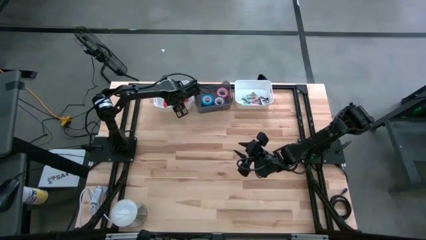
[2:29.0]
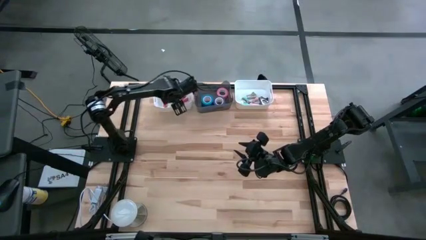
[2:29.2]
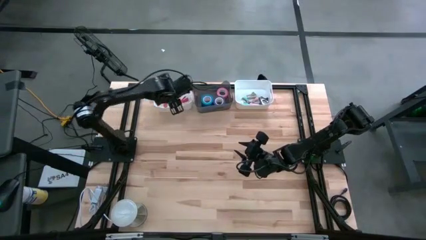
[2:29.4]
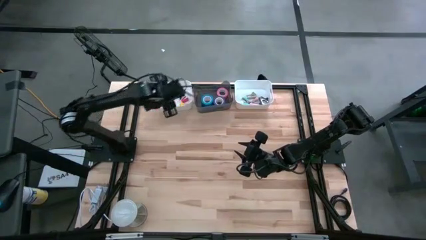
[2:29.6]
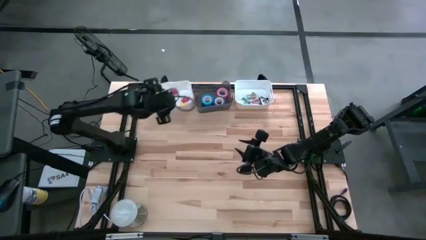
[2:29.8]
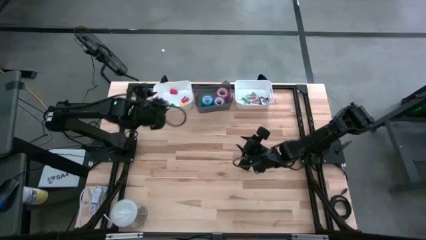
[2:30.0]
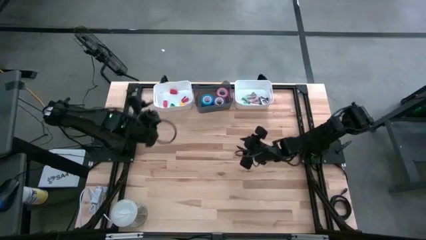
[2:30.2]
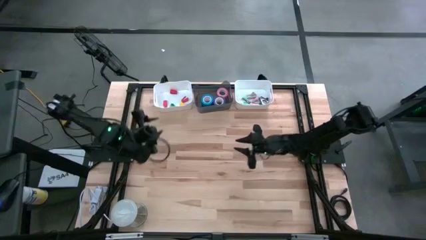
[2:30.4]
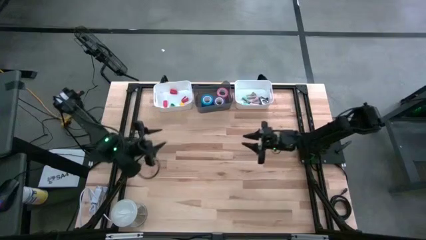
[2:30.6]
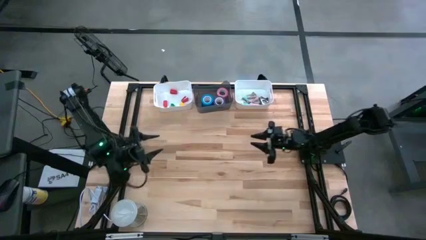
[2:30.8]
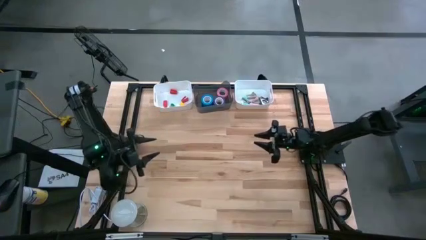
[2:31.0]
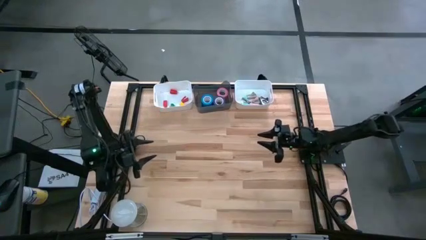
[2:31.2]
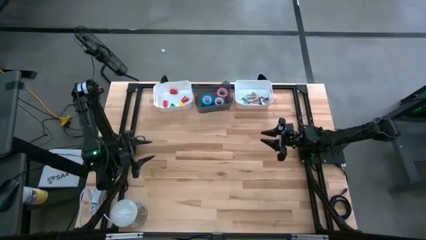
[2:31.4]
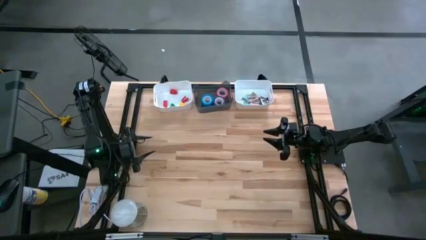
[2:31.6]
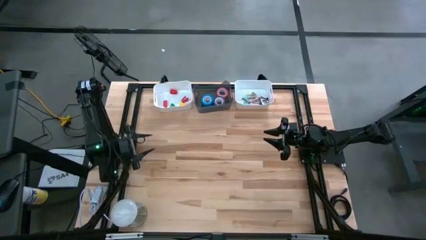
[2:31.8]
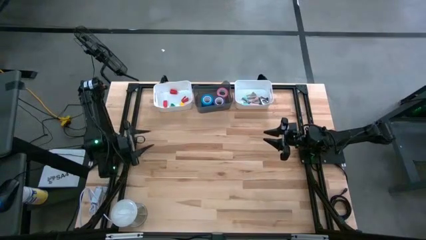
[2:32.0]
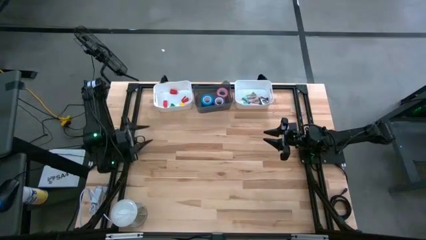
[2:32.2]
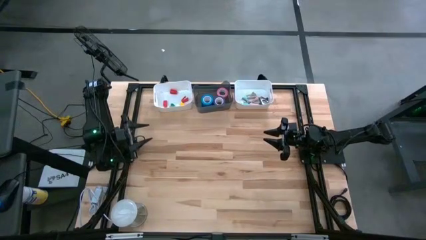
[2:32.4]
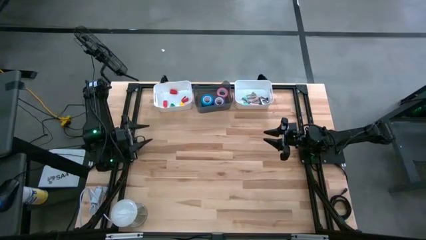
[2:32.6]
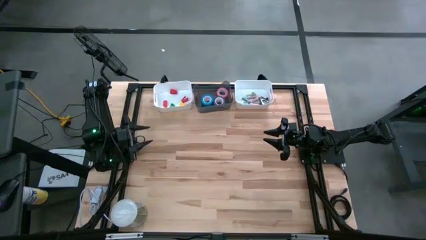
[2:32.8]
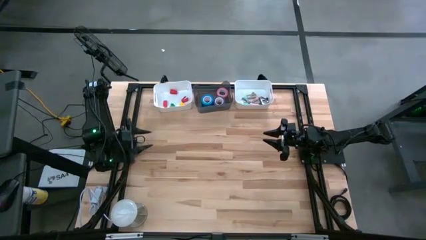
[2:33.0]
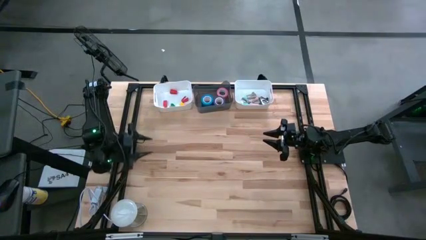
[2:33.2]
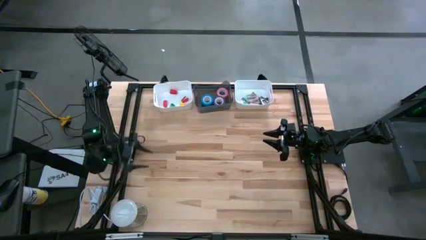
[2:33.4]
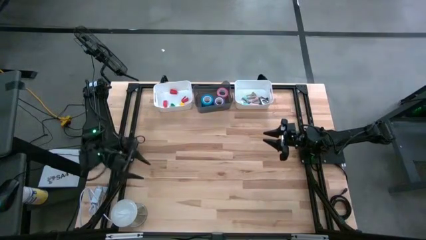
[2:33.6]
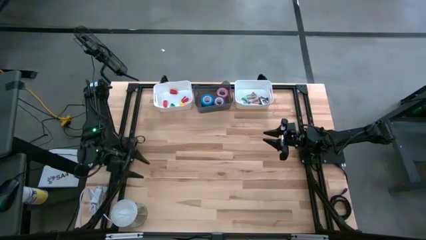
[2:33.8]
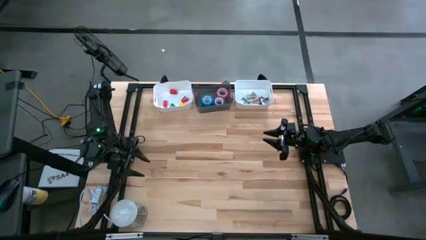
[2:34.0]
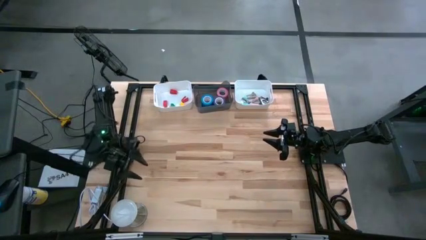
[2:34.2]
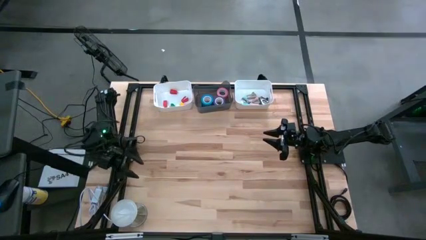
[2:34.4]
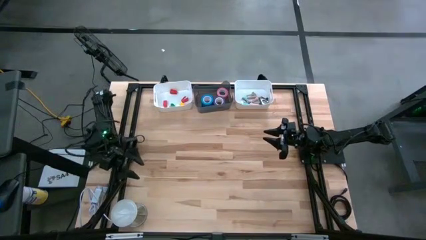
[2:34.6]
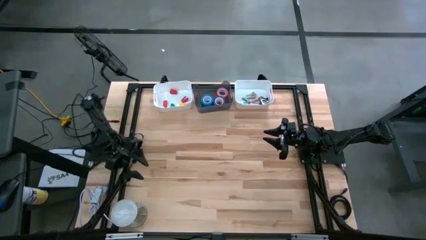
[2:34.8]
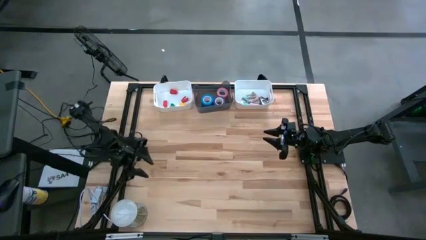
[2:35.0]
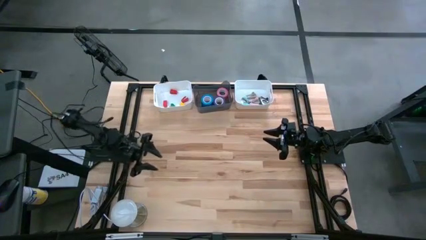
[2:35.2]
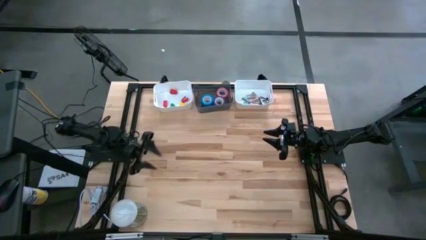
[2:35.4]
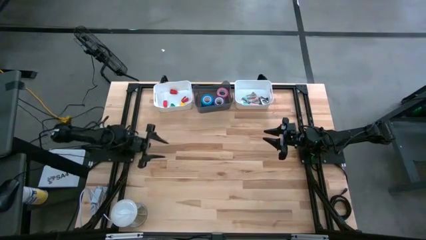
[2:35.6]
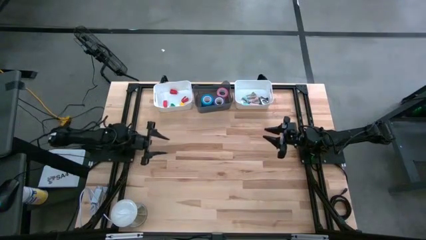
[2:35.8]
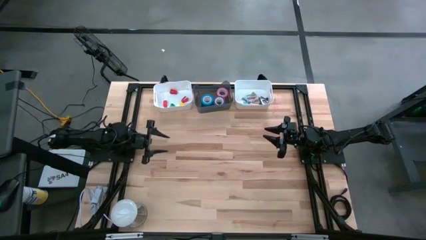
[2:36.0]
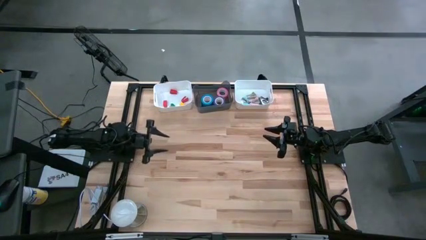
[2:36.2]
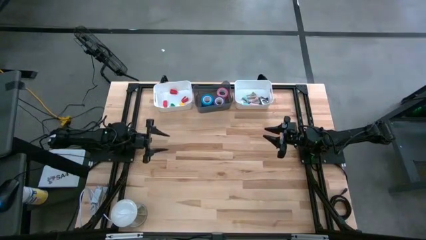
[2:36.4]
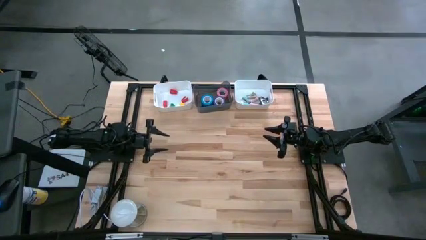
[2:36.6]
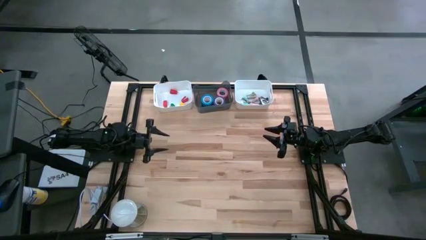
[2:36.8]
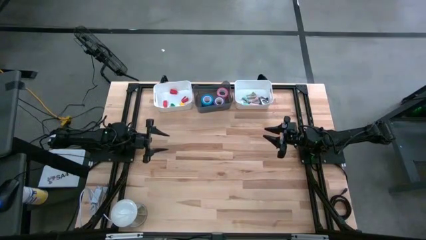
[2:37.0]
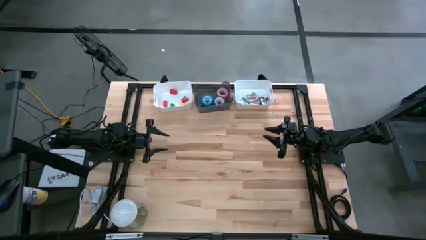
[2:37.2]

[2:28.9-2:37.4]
Task: Pick and place Stapler, Stapler remover, tape
Return to Home Position

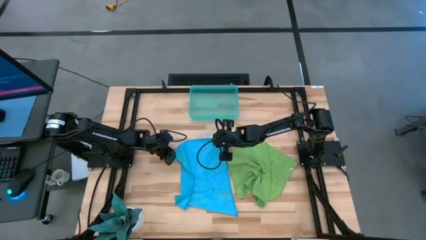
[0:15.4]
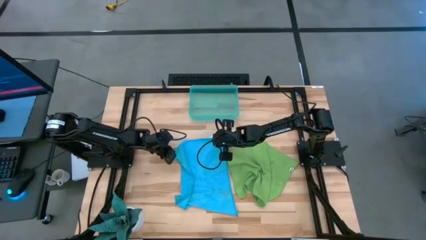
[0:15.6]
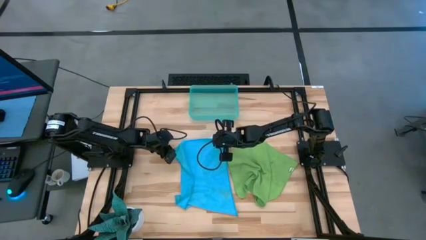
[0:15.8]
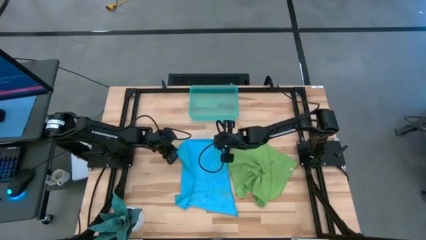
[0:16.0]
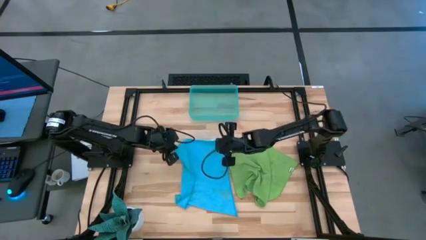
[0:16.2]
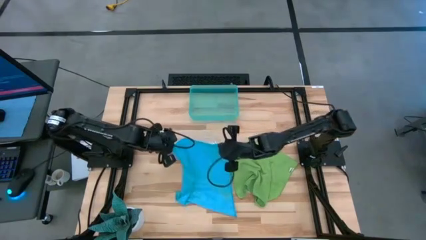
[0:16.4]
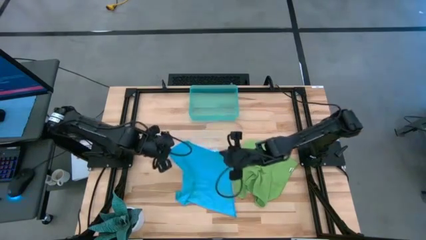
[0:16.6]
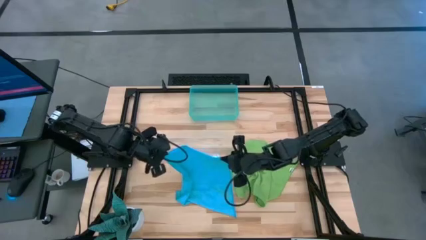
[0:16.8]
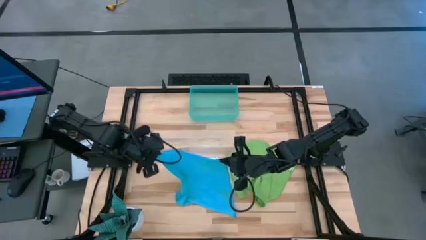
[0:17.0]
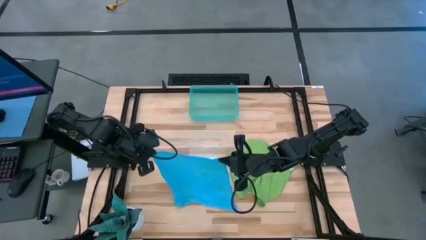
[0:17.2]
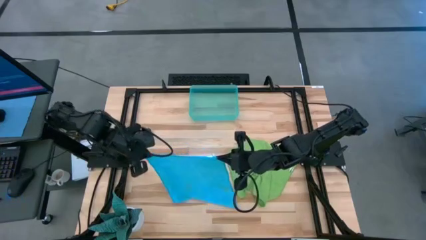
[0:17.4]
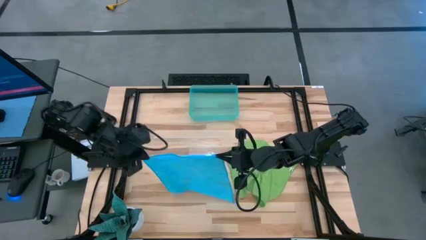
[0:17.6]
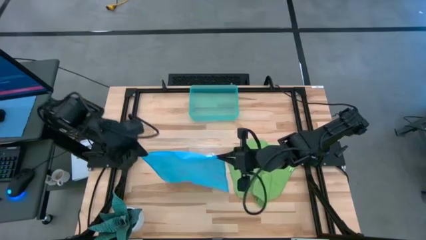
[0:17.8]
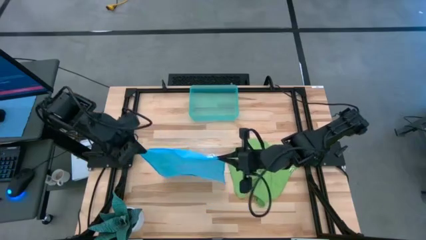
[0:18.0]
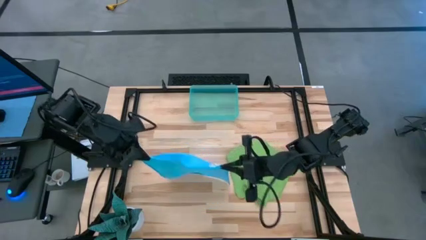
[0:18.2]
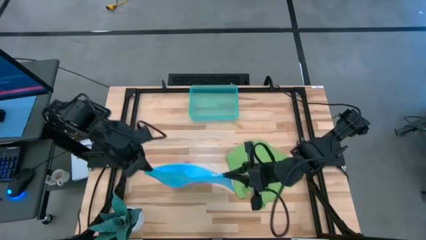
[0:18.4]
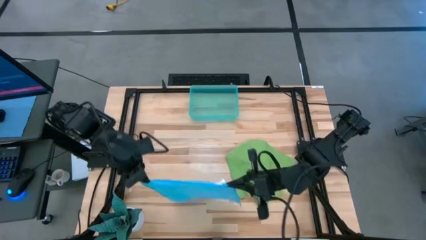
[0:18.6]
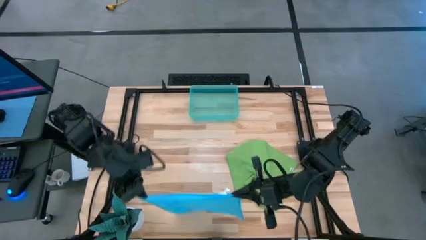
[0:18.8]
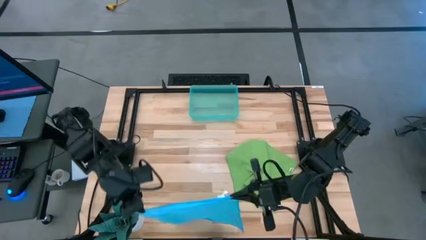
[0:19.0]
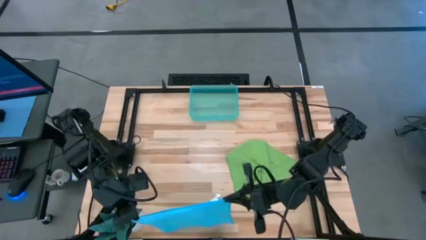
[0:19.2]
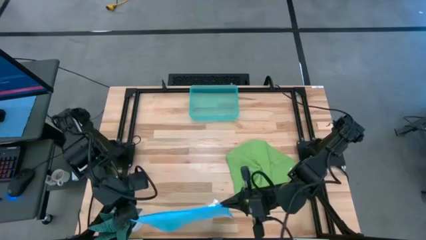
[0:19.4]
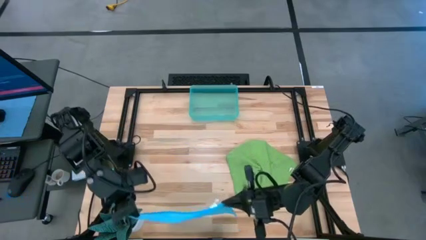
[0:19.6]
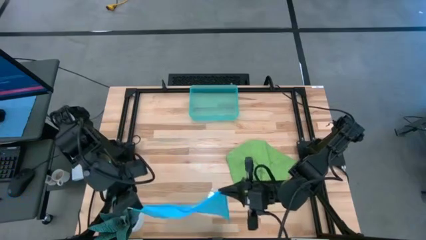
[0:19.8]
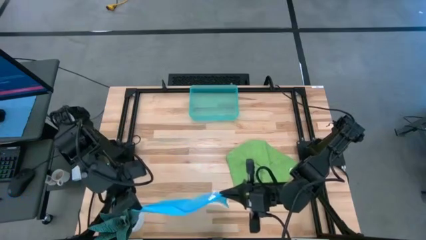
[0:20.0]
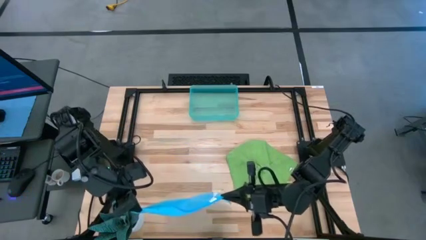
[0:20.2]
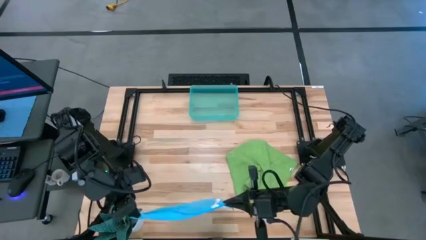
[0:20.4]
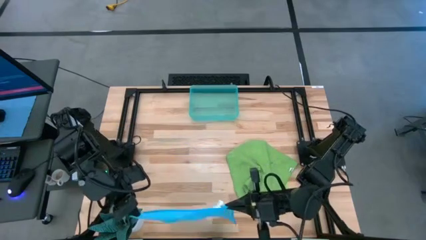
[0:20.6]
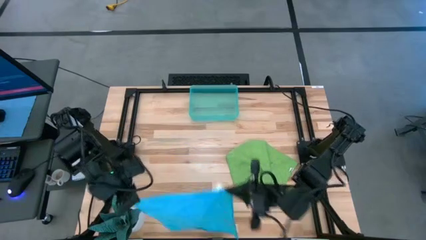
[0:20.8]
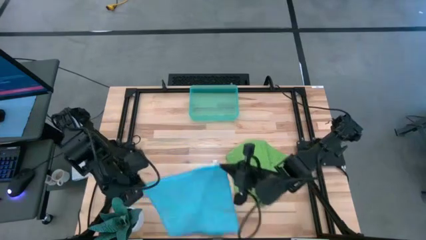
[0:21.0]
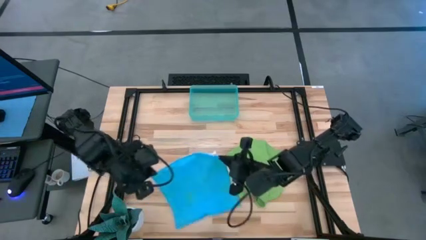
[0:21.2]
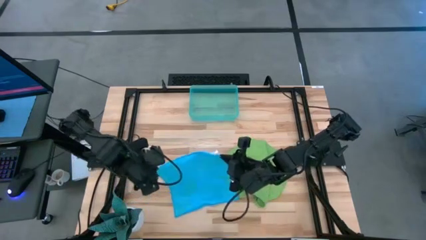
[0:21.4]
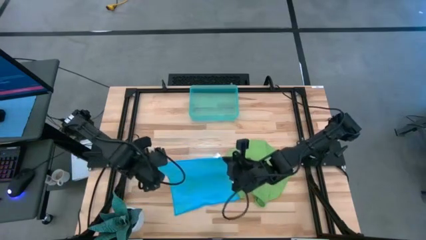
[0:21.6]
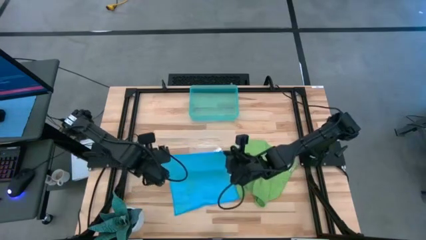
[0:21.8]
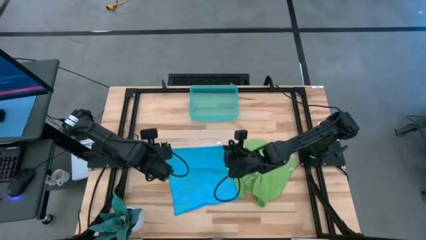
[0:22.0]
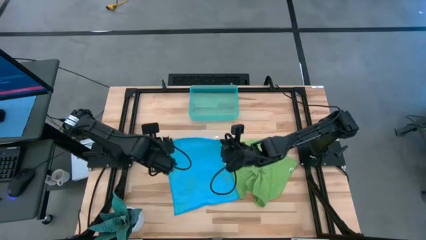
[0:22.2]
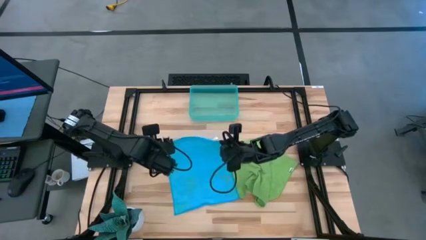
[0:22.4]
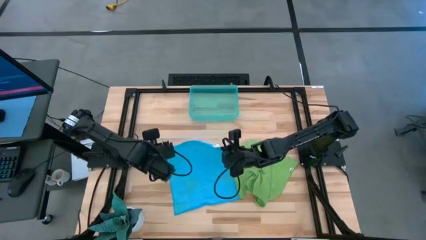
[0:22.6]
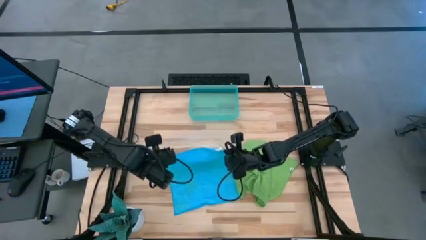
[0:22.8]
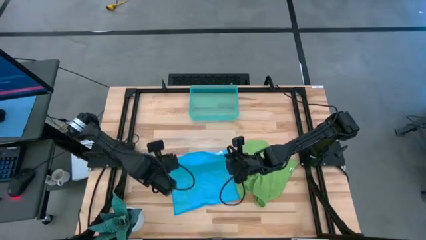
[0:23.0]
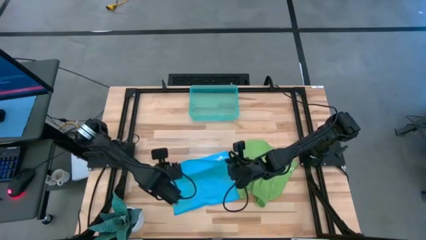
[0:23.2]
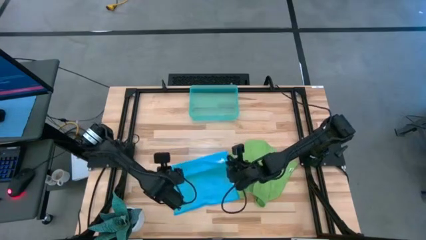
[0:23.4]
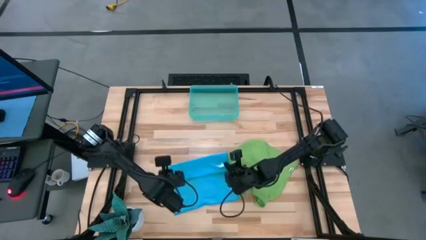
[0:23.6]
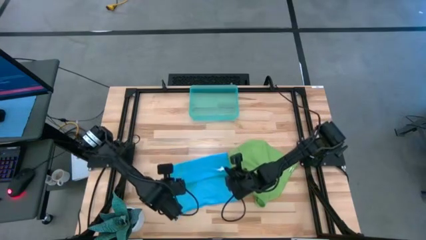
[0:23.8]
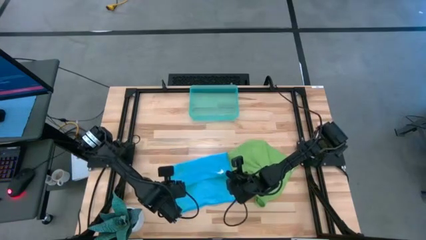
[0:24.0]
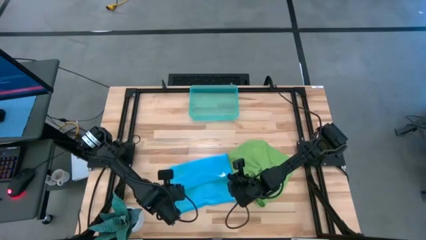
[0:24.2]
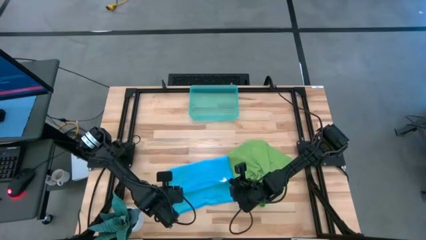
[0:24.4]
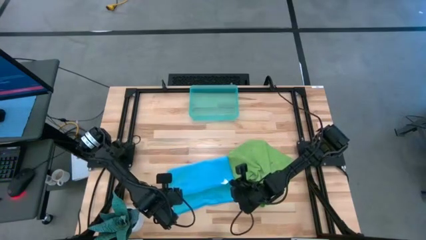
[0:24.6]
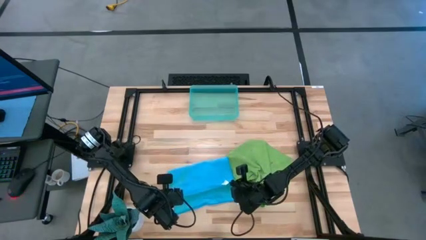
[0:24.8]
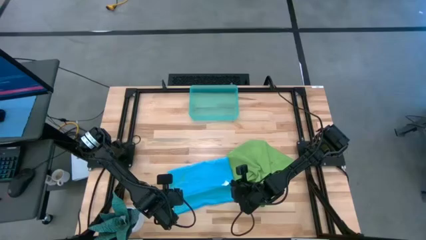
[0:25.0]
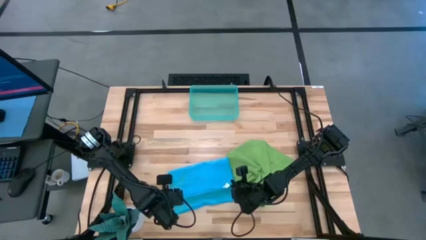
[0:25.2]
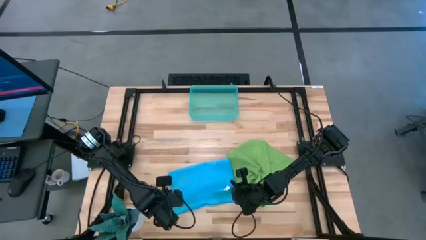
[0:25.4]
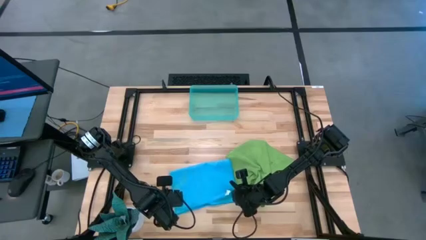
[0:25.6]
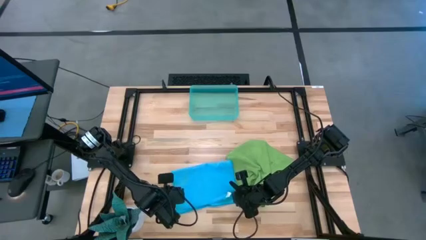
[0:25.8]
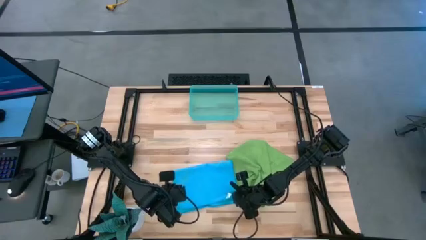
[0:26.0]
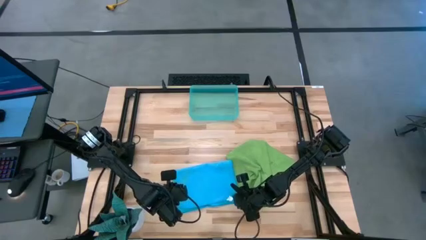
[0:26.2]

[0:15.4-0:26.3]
Task: Roll microfiber towels into tight, uniform cylinder then place into a basket
Fold the blue microfiber cloth
